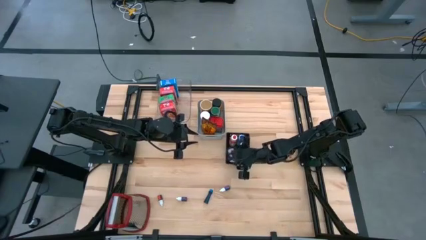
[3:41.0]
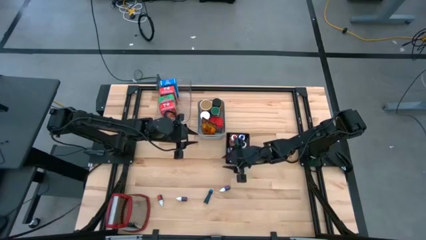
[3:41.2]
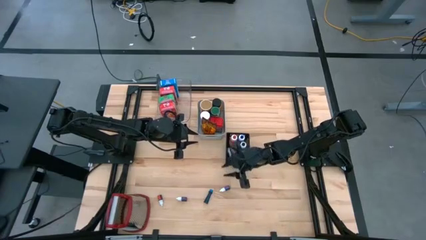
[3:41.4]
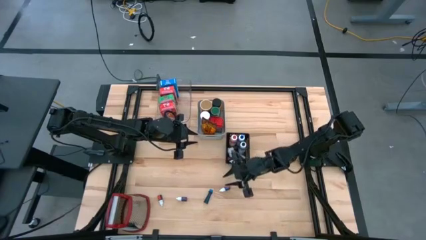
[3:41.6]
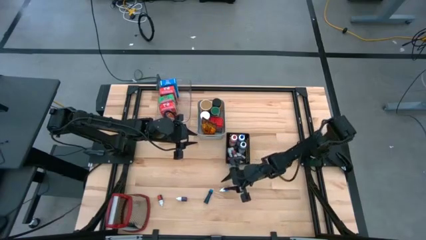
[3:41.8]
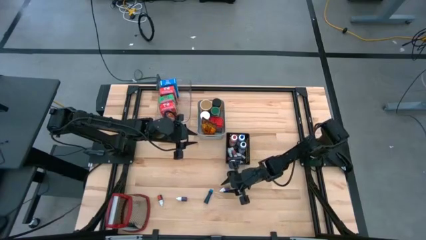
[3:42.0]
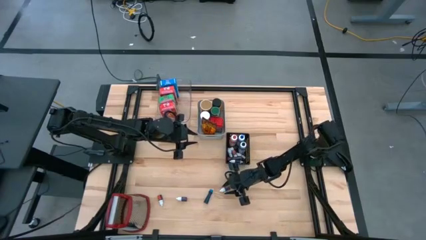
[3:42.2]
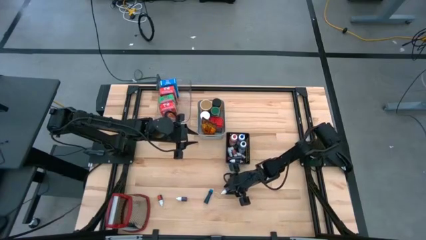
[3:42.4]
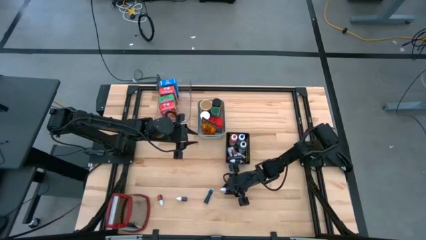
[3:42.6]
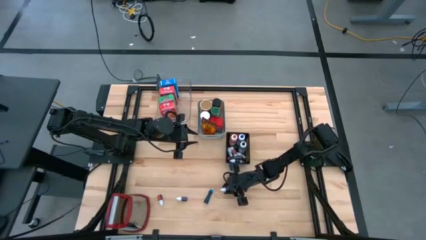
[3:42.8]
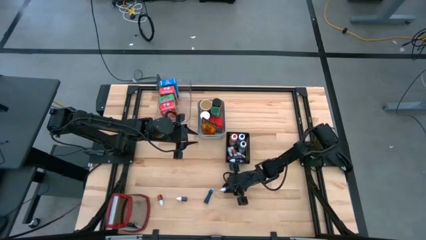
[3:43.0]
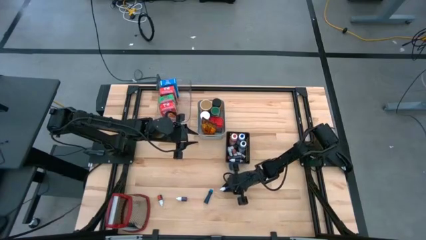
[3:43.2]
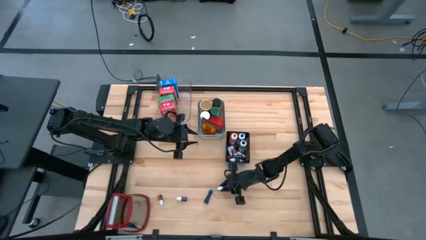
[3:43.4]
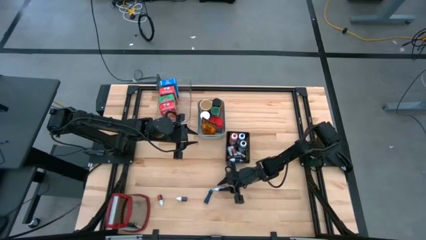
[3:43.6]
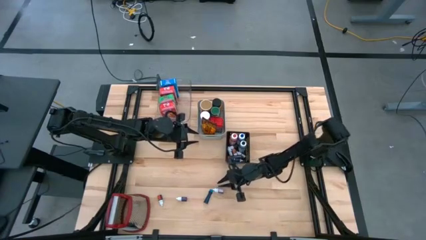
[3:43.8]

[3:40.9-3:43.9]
Task: Pick & Place Kitchen Items
Put the middle purple food coloring bottle into the black bin

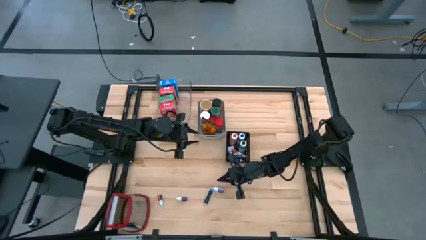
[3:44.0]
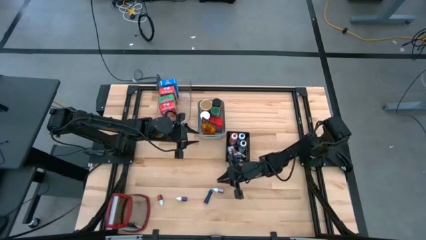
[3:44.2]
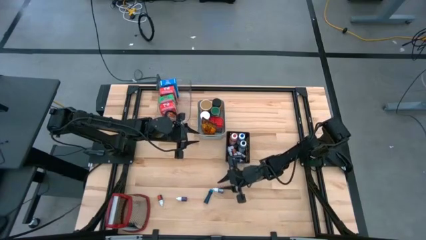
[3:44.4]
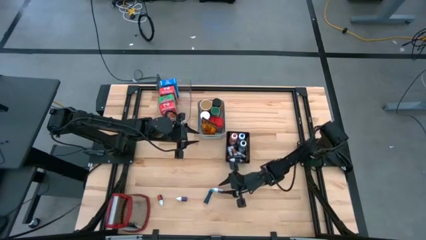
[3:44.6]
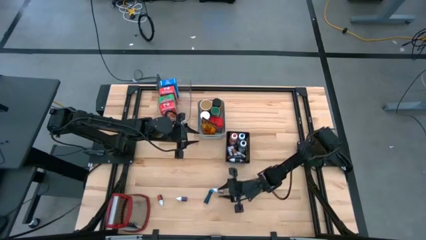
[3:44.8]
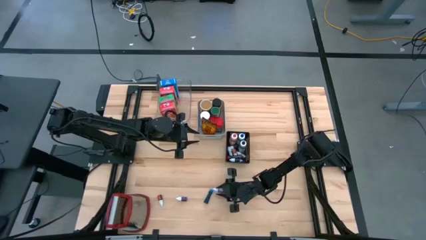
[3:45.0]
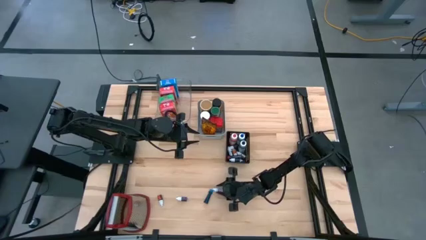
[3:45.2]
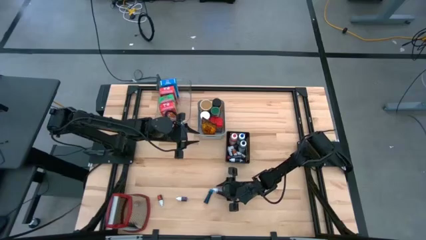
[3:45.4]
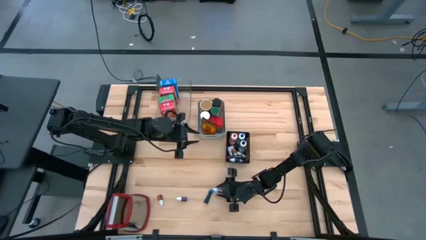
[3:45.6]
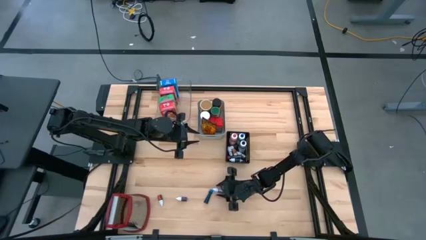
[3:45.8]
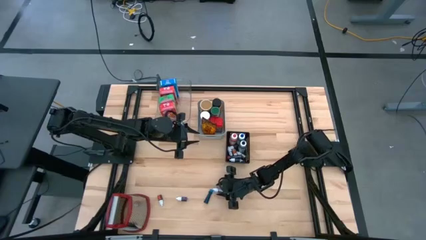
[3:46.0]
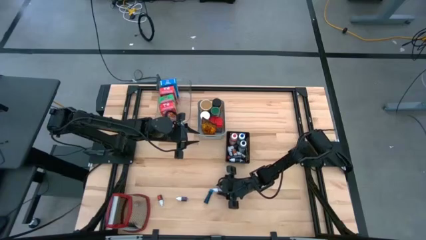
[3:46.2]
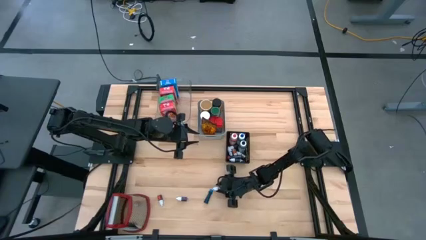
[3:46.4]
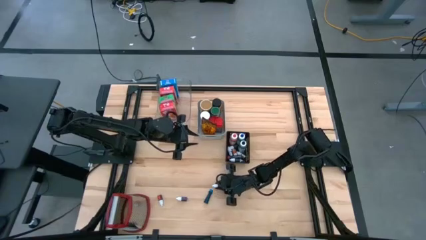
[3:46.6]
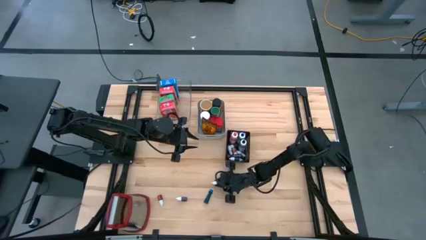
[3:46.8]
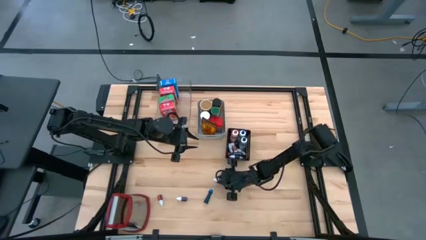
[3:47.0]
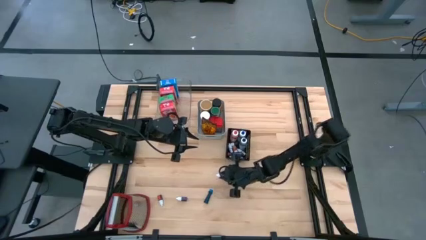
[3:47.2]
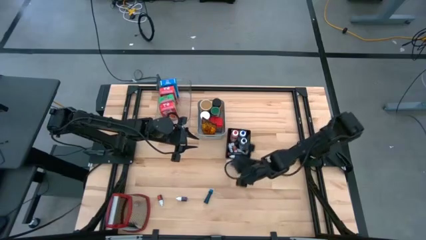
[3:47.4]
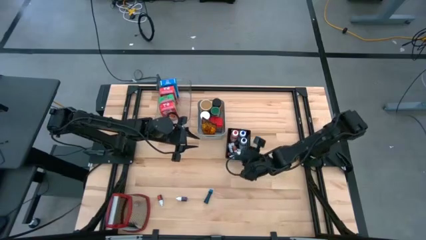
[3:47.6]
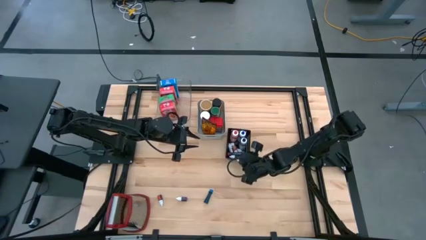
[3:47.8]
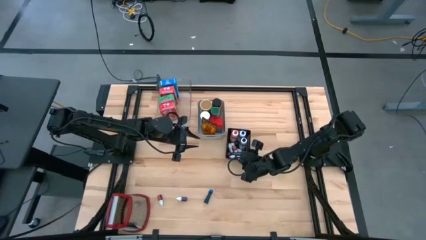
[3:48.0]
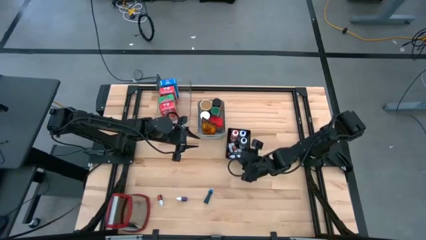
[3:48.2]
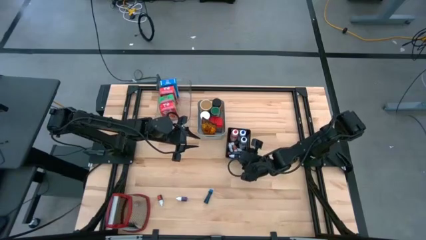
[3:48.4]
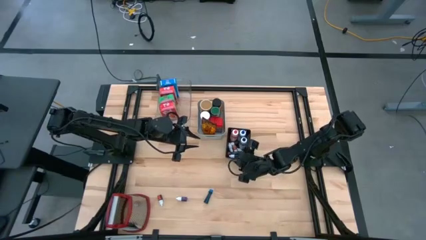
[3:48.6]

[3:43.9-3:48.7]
Put the purple food coloring bottle into the black bin

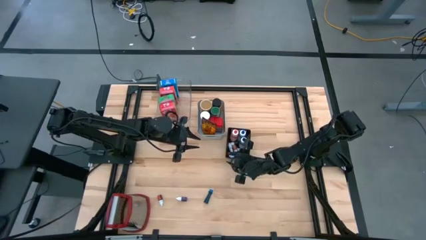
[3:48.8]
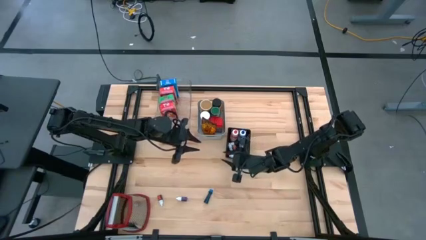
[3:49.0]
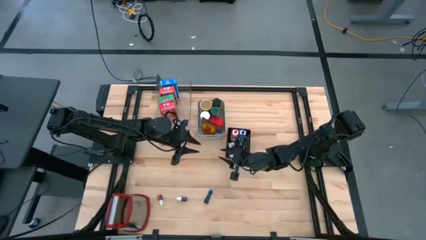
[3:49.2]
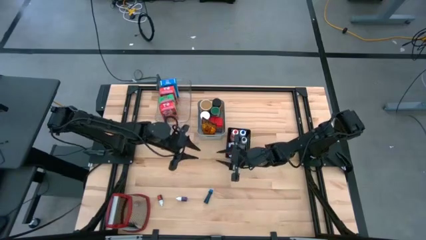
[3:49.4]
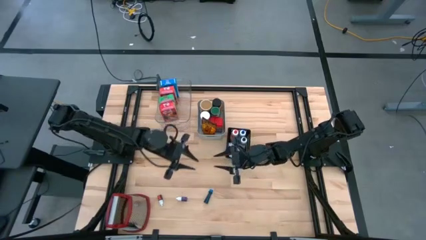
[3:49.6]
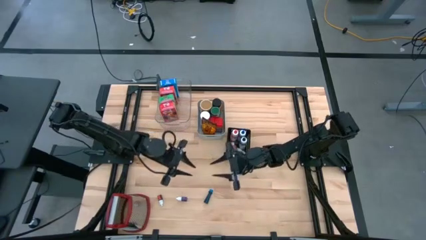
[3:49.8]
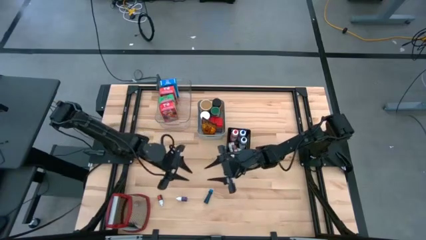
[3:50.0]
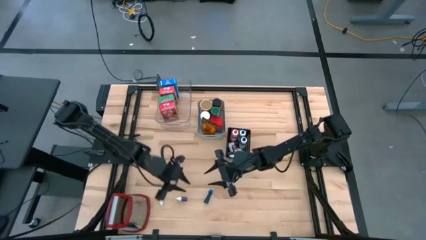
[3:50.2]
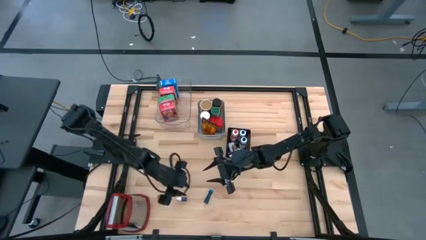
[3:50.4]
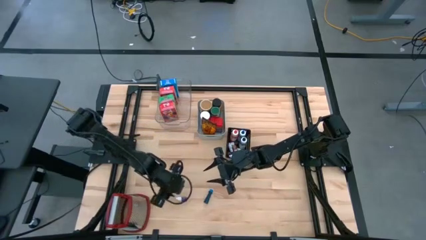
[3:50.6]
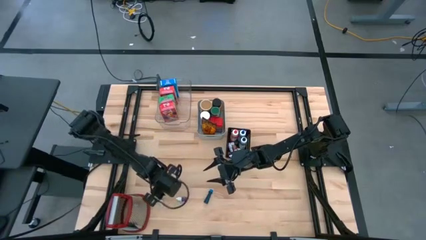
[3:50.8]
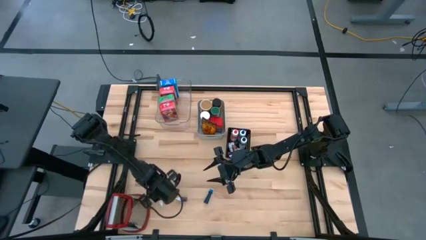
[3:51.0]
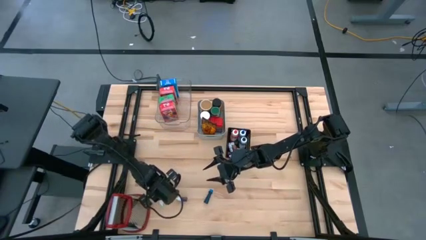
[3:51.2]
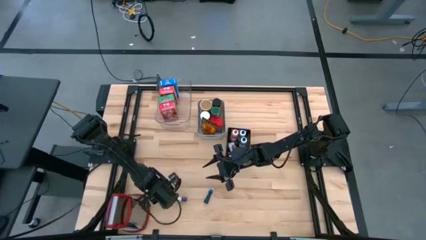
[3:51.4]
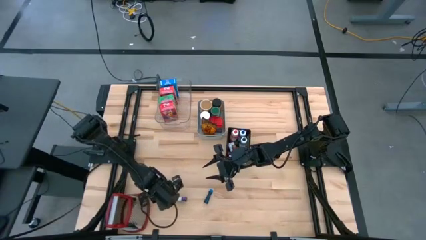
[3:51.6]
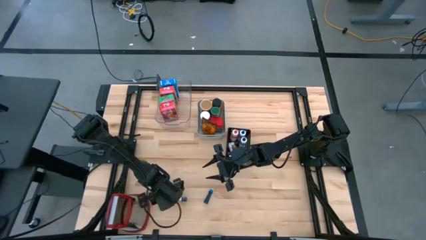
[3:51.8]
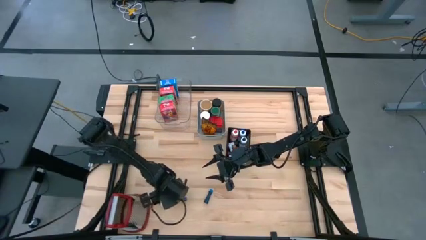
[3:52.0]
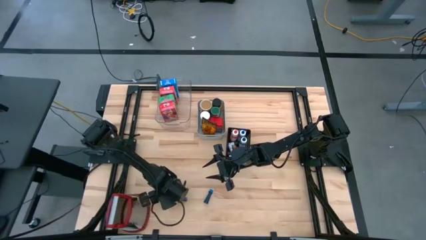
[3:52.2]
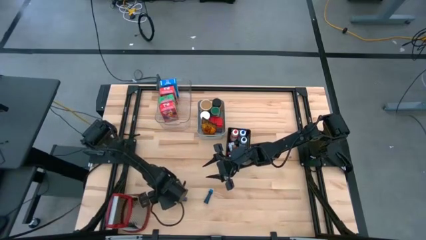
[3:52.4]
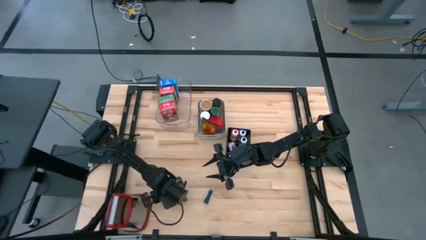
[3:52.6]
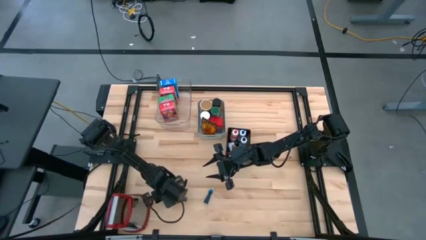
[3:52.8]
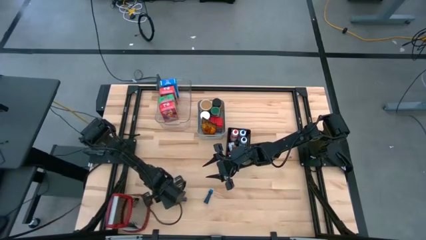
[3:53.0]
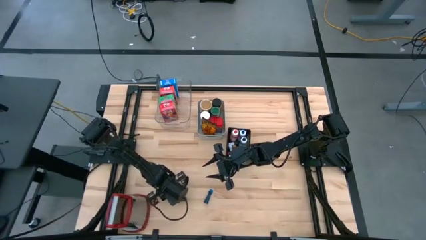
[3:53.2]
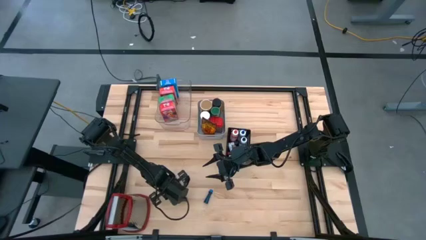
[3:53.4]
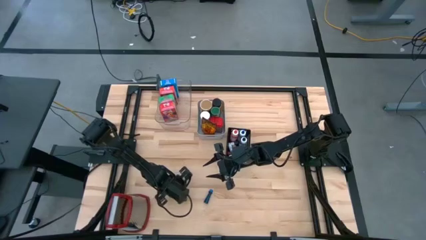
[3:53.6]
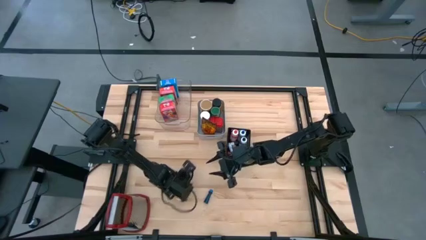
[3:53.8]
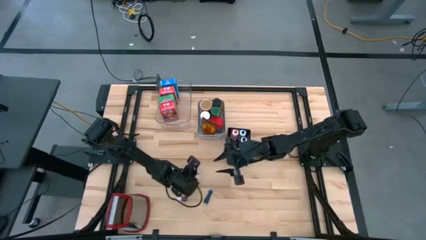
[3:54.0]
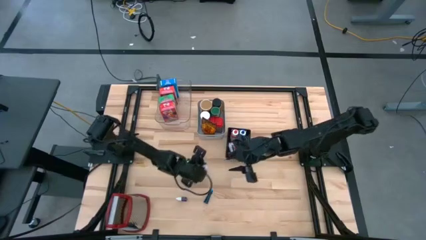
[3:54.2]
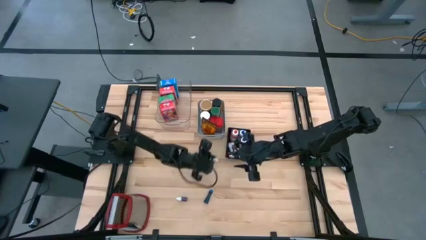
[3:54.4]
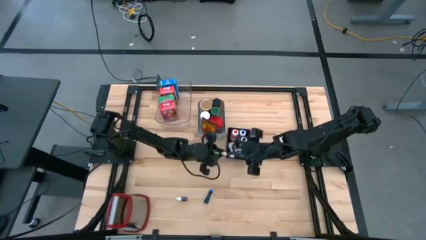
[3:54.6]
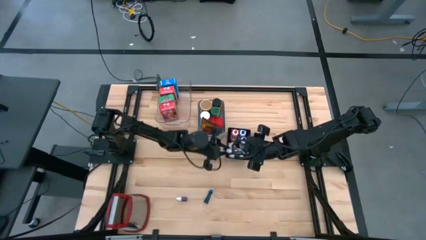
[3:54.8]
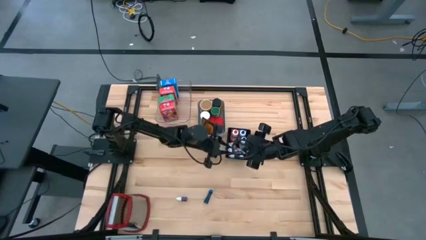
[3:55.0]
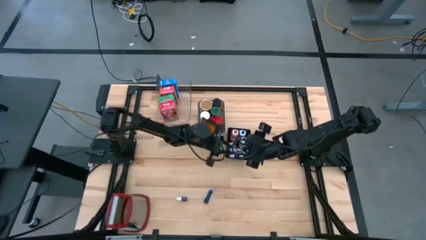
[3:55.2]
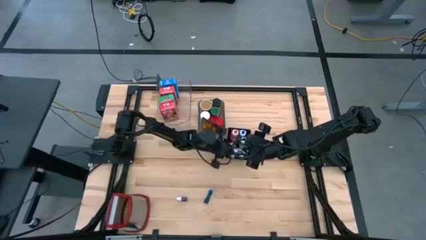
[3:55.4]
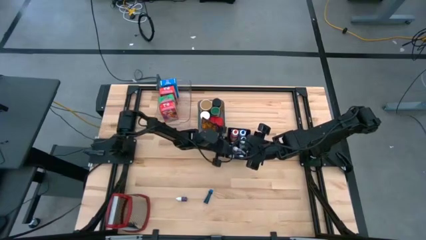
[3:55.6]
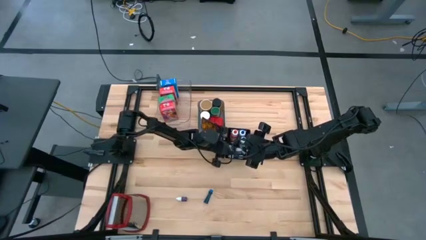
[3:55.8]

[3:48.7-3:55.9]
Put the red food coloring bottle into the black bin

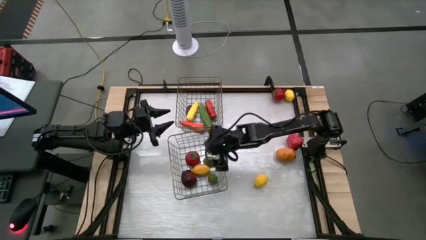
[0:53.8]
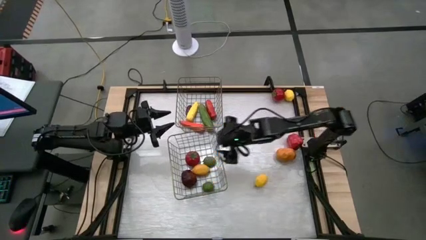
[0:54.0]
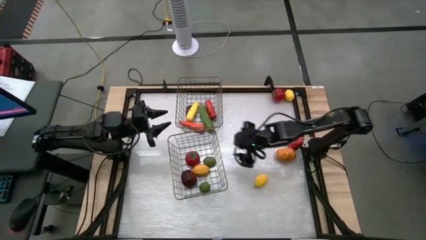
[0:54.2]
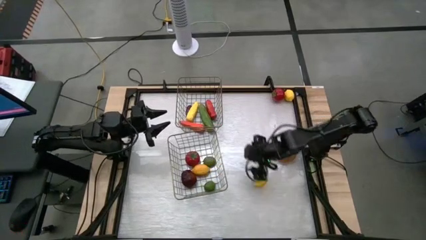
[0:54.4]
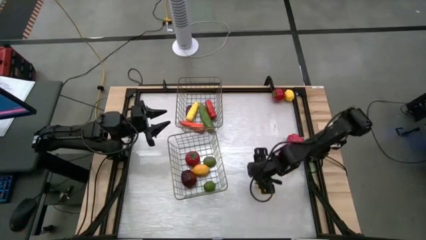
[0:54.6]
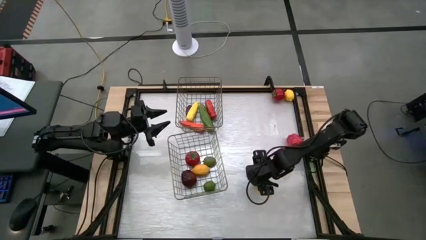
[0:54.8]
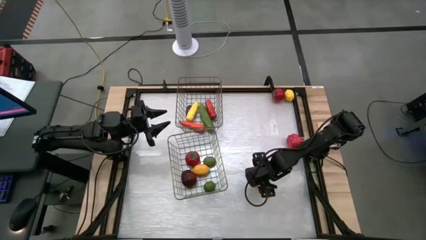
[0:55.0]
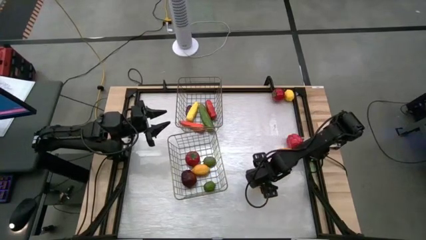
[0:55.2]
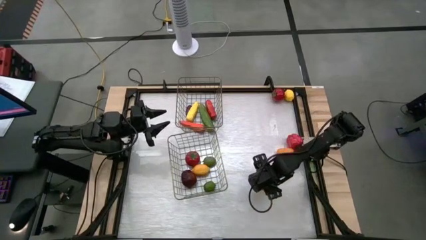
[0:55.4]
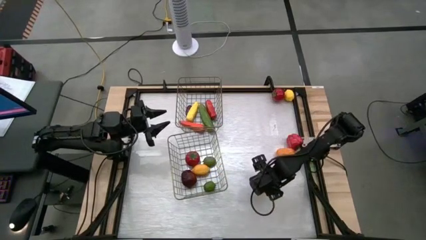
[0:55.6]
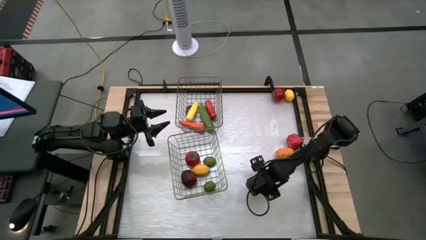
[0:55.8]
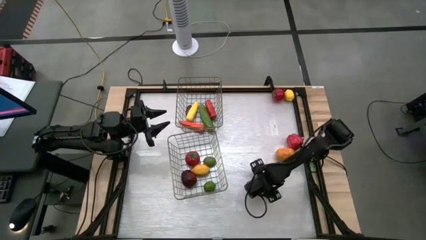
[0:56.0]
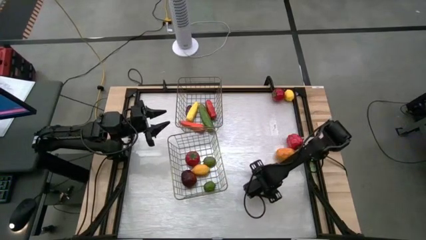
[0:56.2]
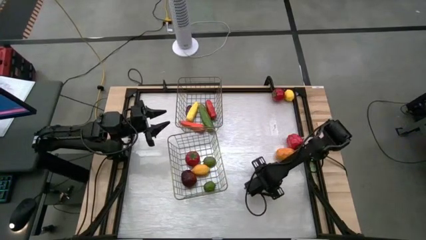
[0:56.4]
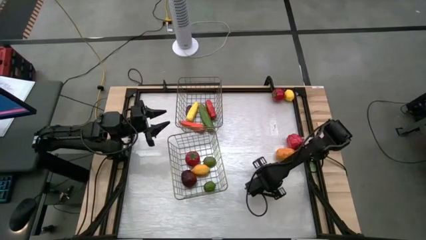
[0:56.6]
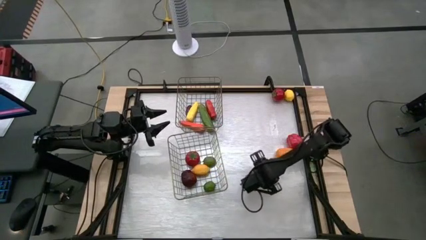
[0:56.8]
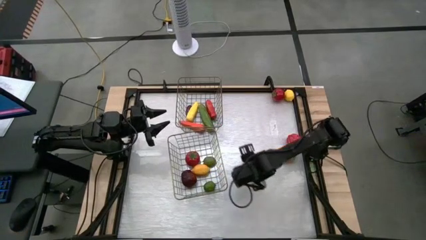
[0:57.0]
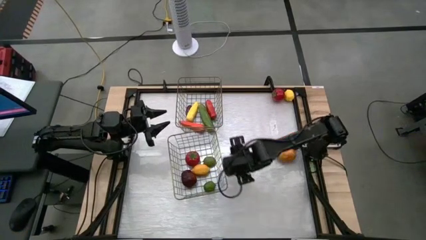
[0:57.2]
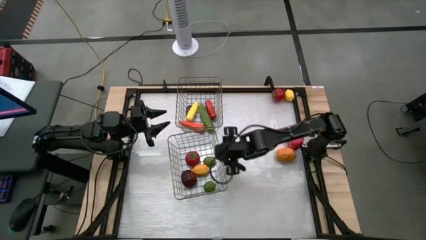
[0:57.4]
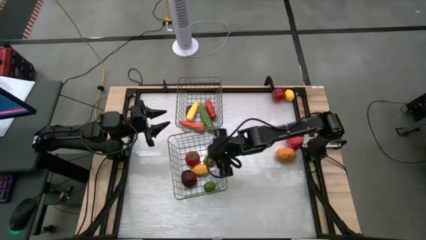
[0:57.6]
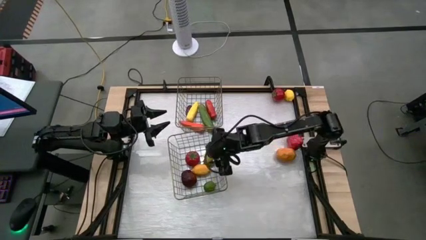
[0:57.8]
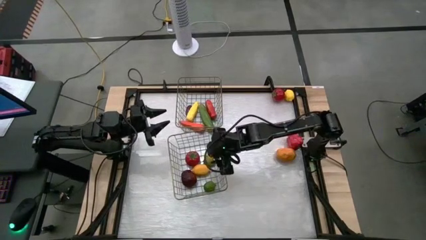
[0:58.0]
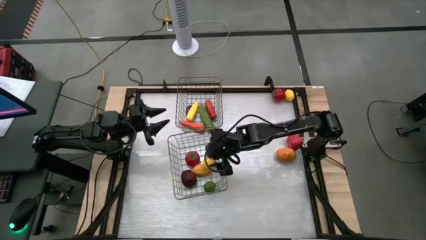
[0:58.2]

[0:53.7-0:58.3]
Task: Sort produce into baskets
Put the bottom yellow lemon into the bottom basket
